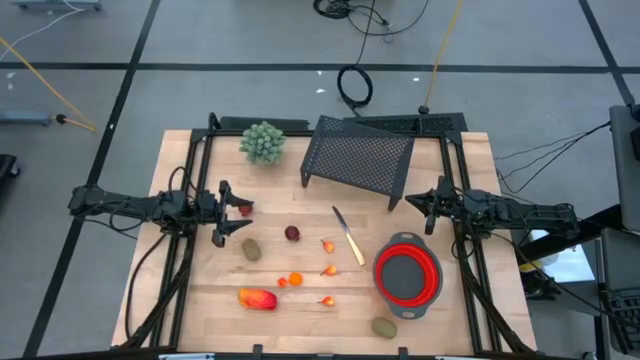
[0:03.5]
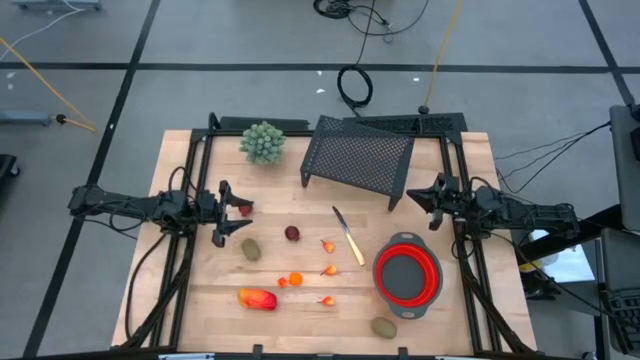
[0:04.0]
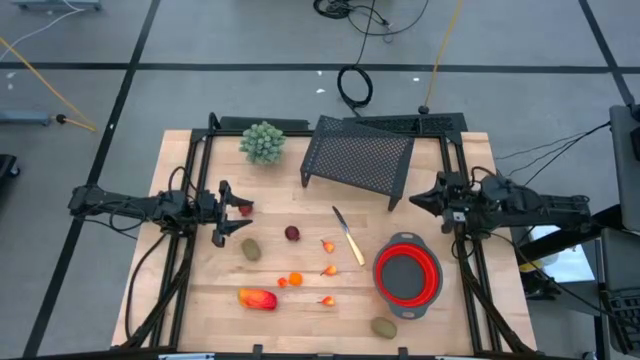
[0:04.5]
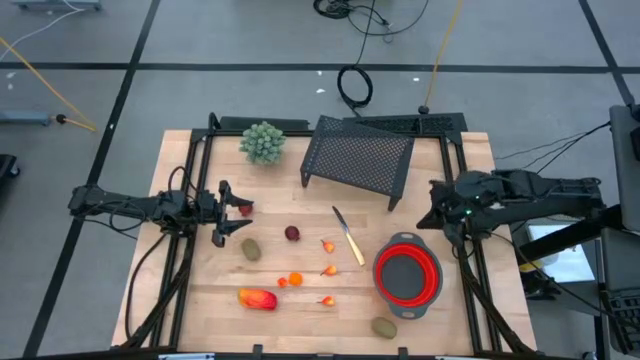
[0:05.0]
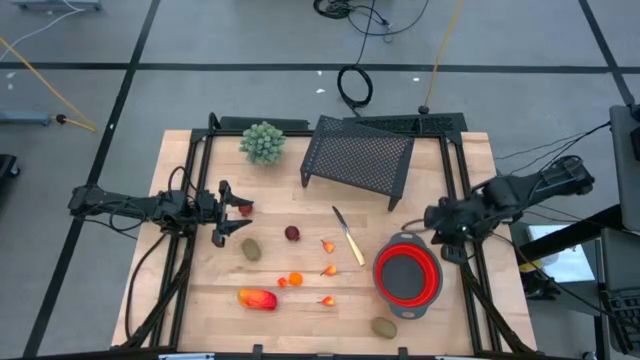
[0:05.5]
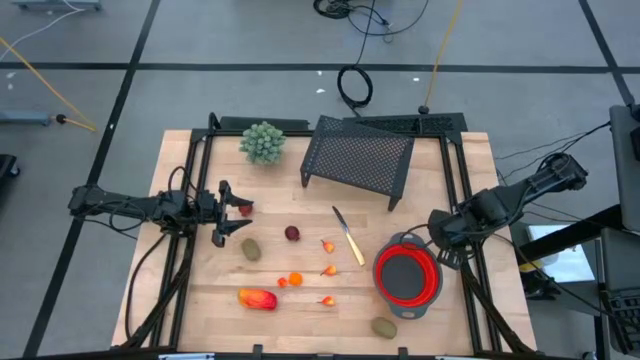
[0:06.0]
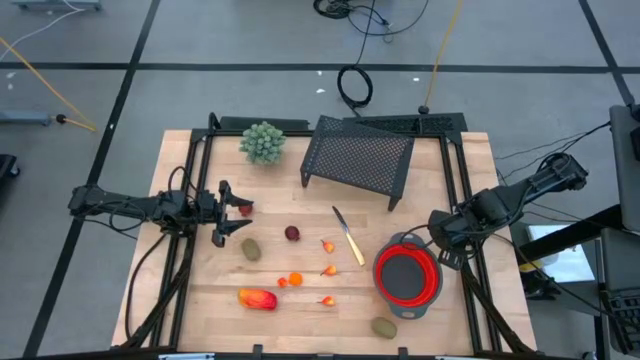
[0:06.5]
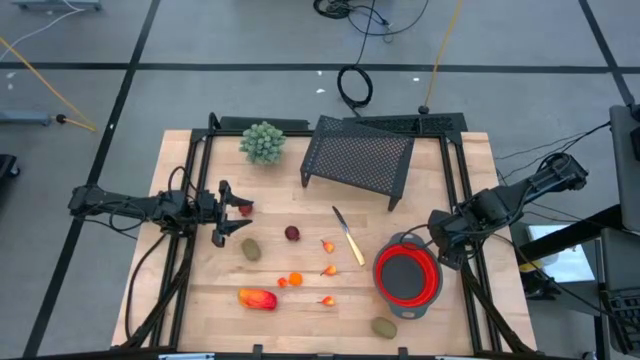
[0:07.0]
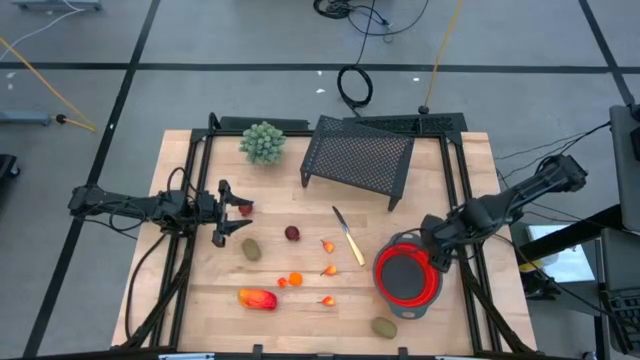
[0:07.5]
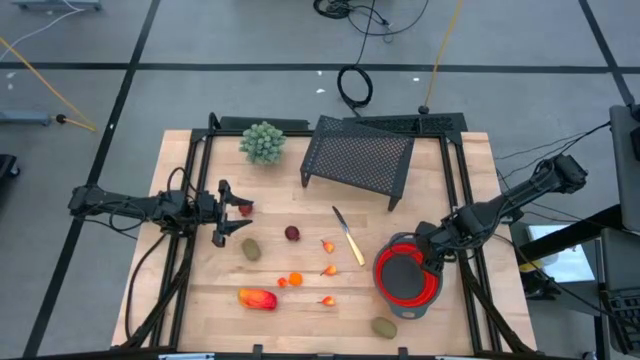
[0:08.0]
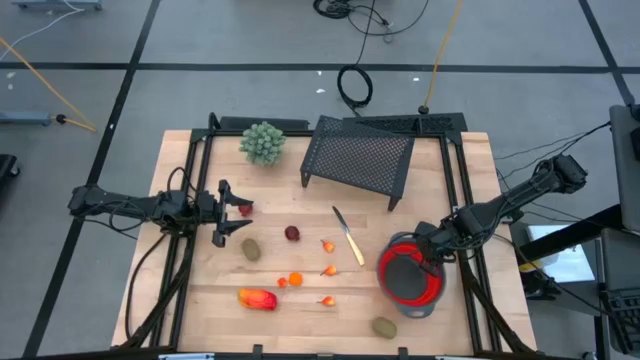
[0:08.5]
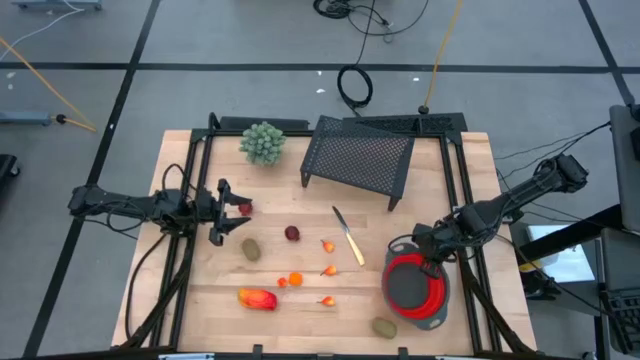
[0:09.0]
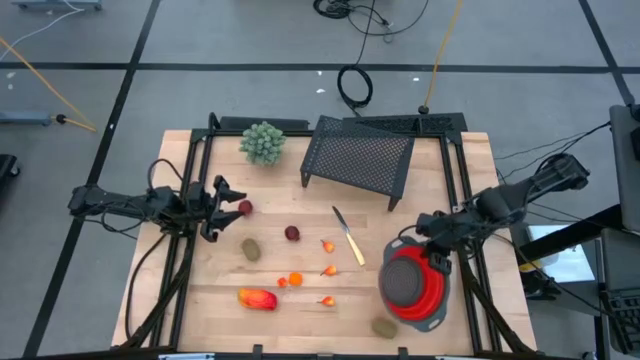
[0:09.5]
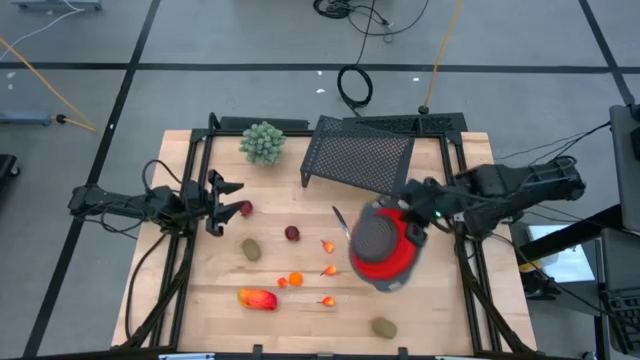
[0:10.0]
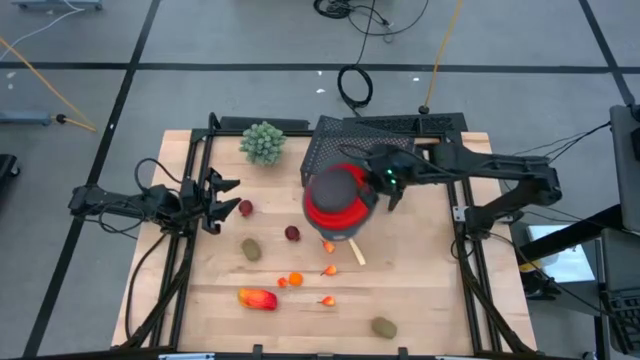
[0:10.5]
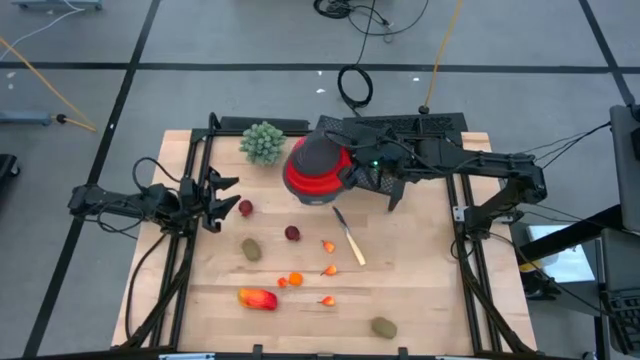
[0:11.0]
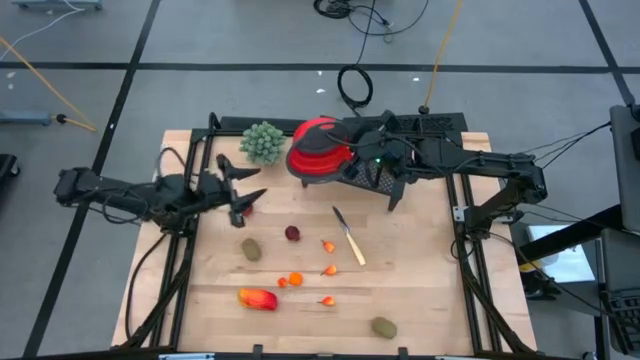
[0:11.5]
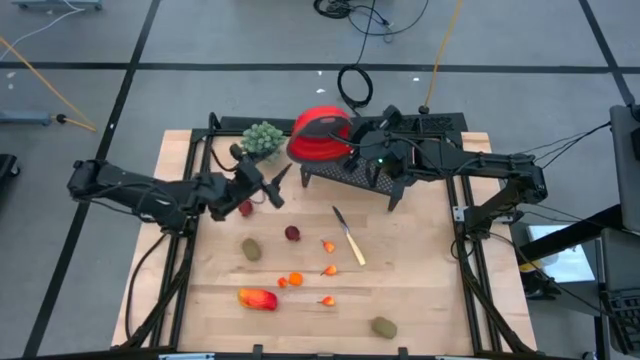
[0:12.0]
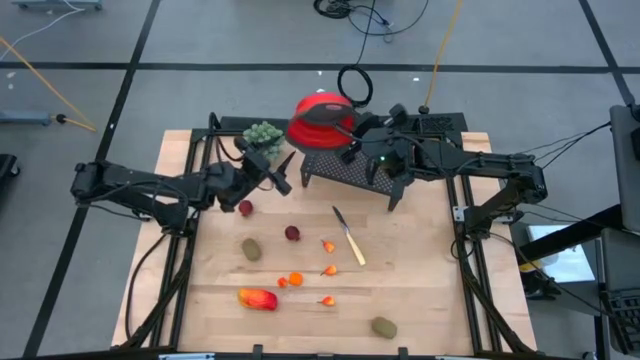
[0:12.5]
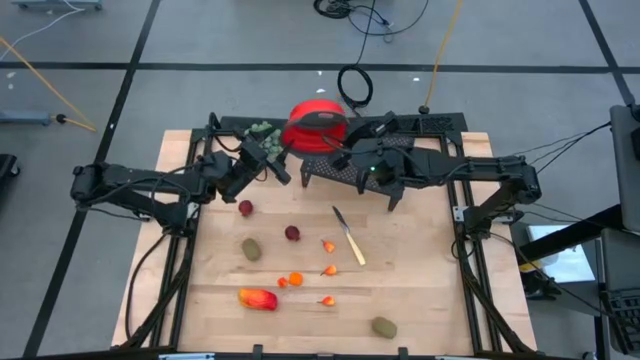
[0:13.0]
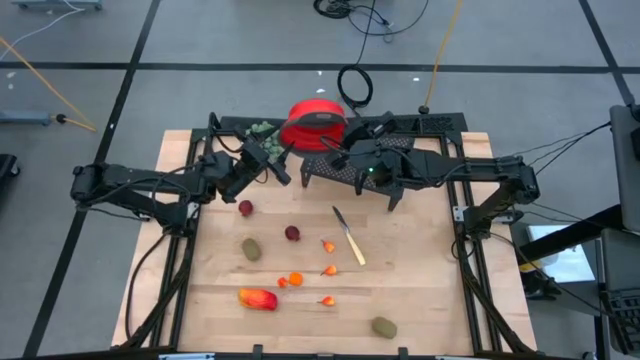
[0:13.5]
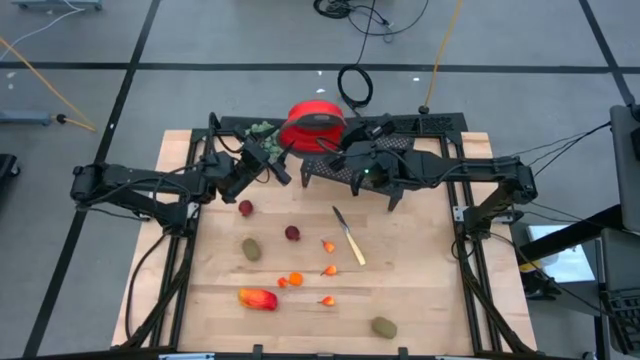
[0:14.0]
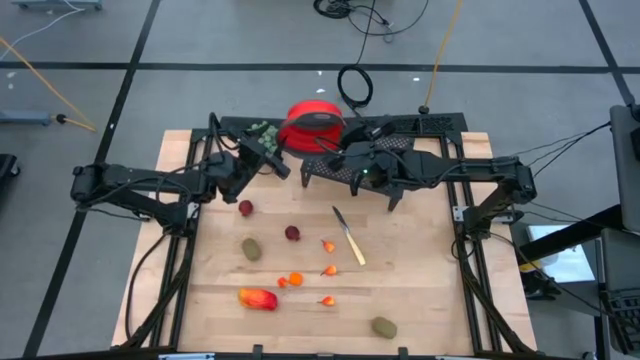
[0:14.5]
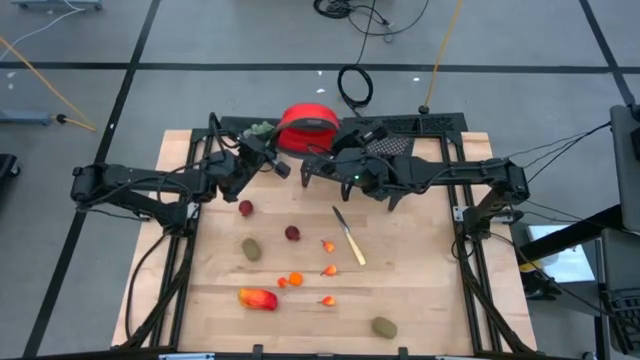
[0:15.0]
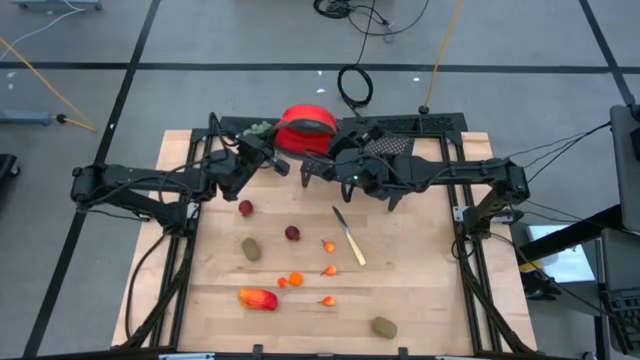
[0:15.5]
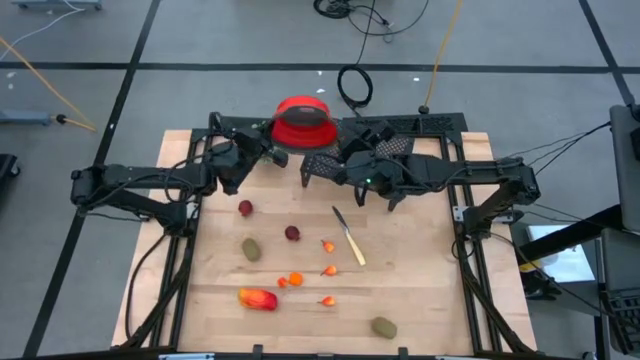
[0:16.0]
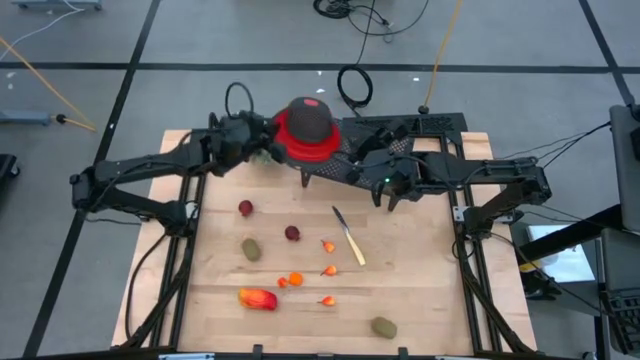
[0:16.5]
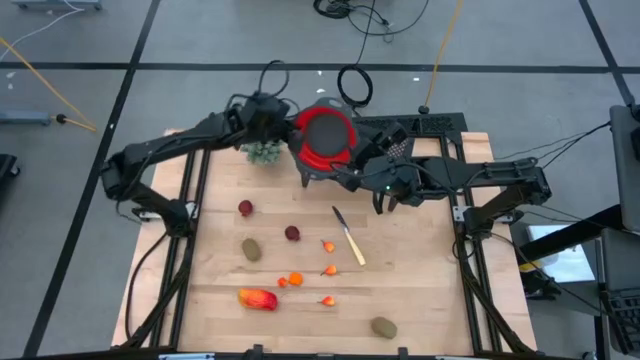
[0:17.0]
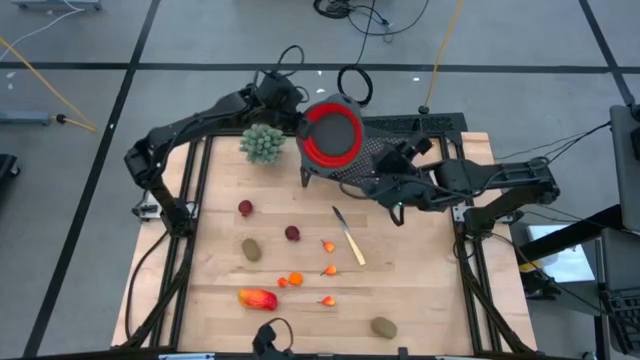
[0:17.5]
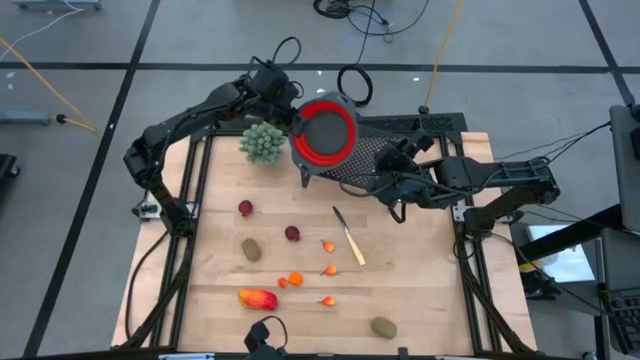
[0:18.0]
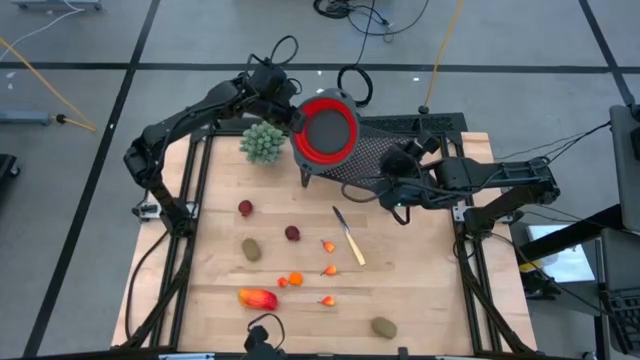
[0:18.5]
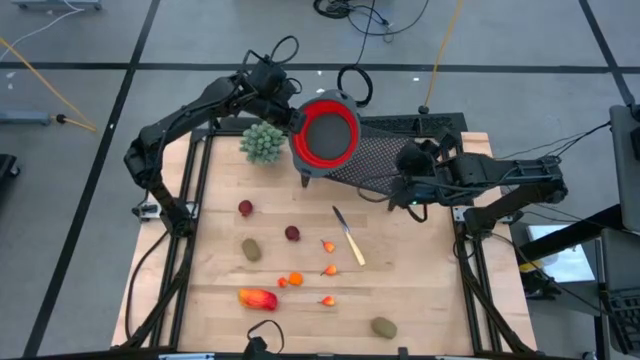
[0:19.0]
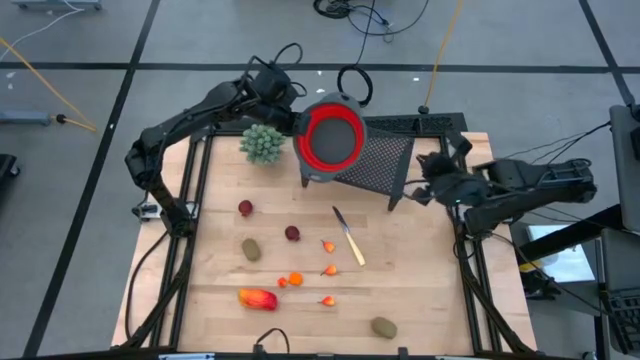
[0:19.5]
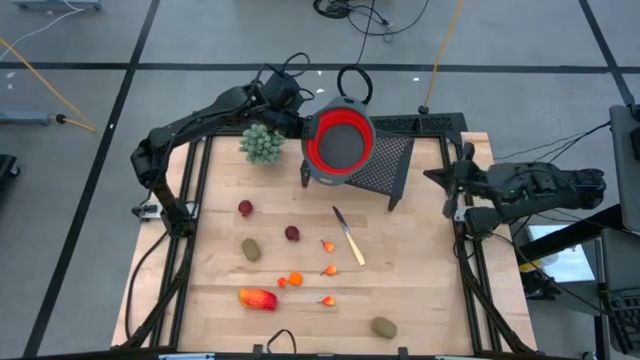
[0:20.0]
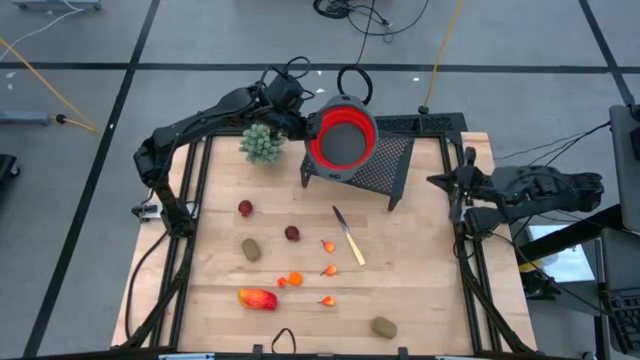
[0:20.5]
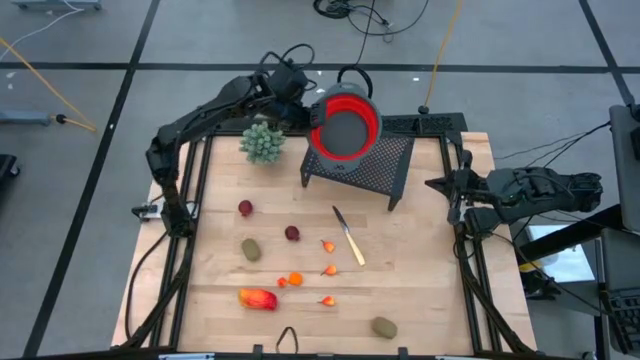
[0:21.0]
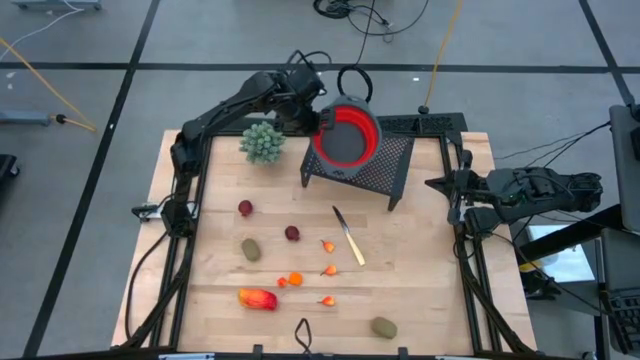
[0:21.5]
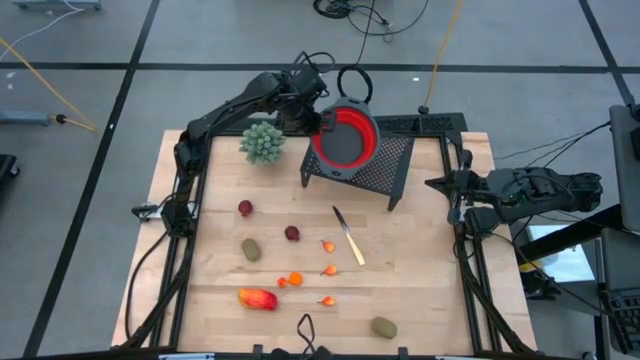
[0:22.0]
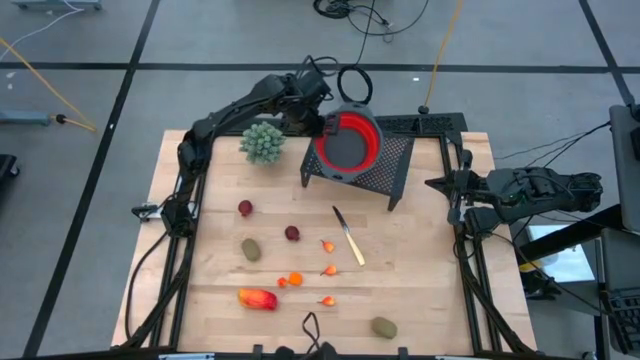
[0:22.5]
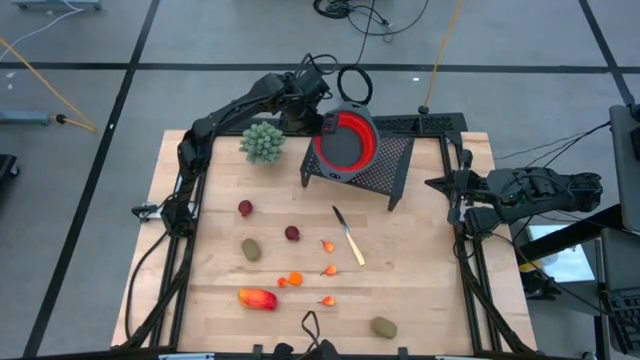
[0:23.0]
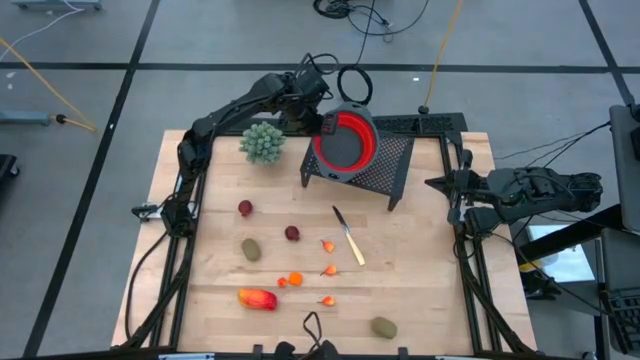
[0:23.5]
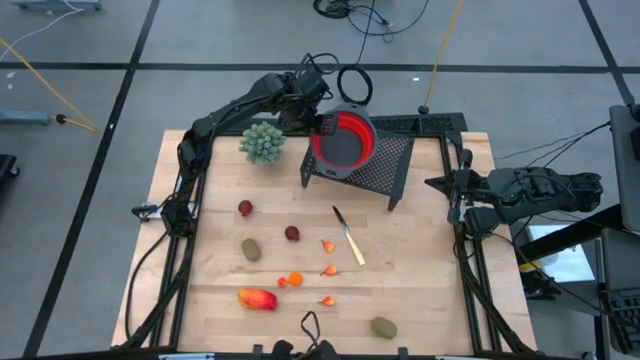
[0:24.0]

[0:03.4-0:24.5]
Task: Pick & Place Fruit
Put the red strainer bowl on the shelf
